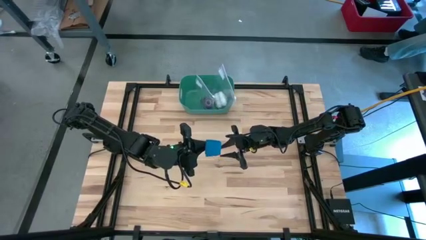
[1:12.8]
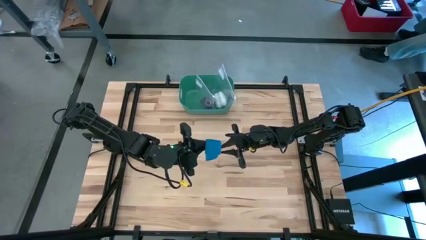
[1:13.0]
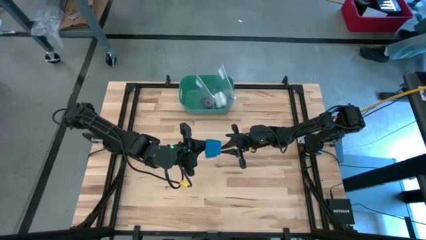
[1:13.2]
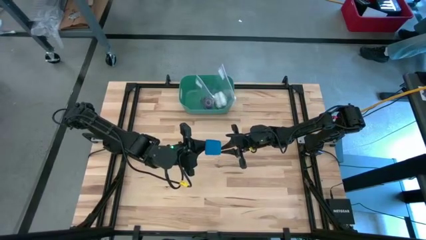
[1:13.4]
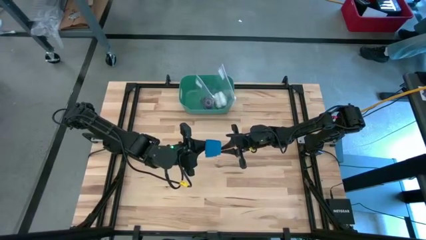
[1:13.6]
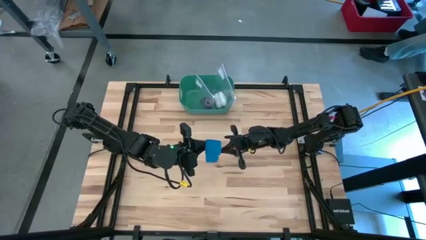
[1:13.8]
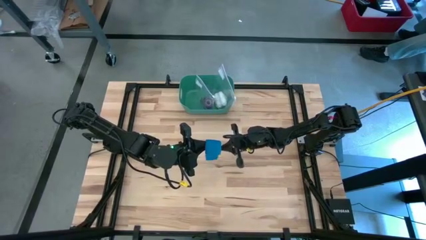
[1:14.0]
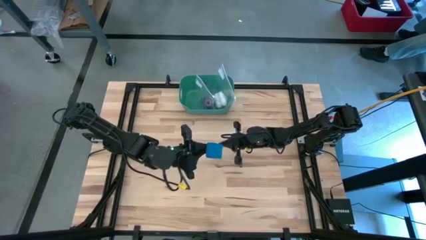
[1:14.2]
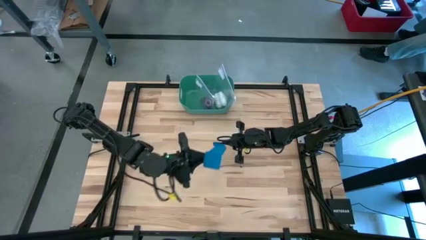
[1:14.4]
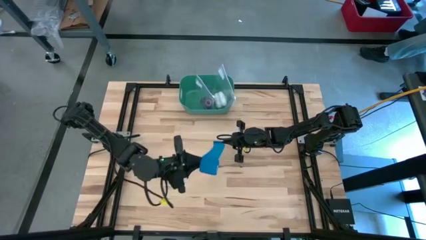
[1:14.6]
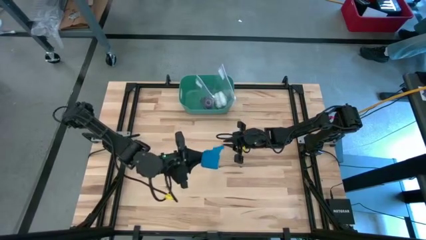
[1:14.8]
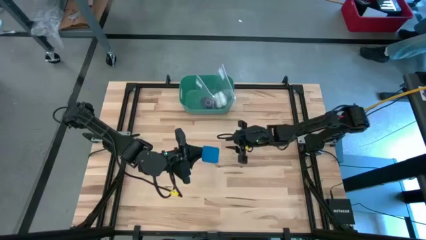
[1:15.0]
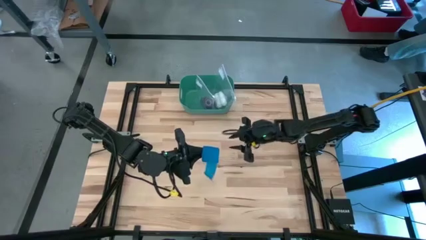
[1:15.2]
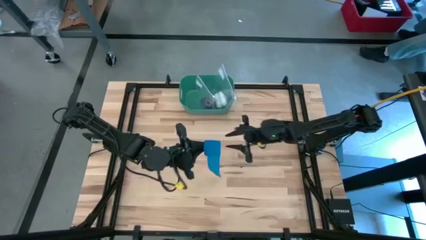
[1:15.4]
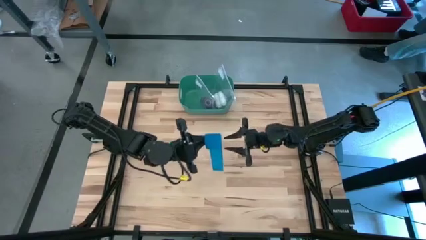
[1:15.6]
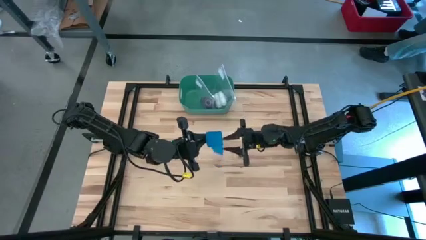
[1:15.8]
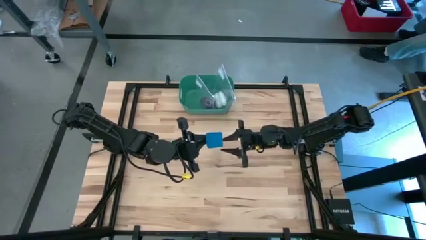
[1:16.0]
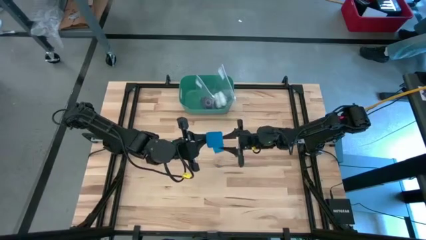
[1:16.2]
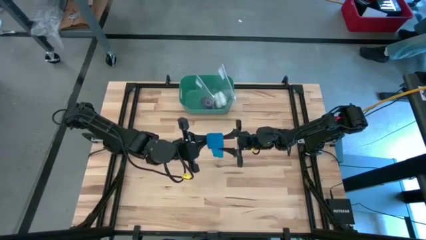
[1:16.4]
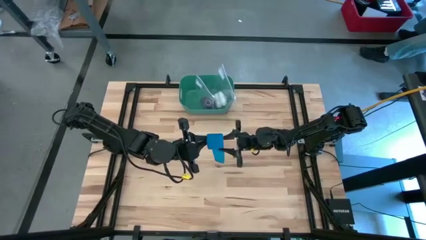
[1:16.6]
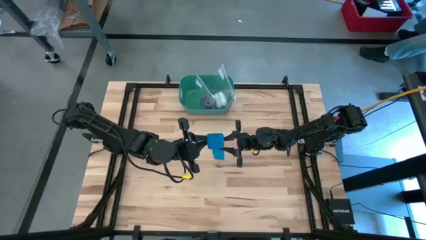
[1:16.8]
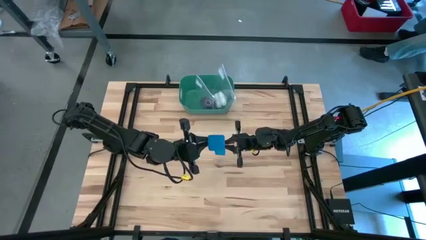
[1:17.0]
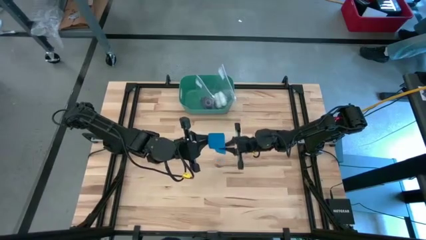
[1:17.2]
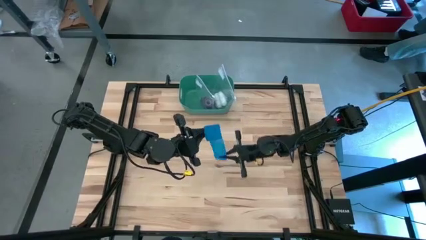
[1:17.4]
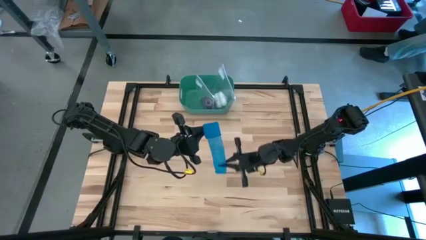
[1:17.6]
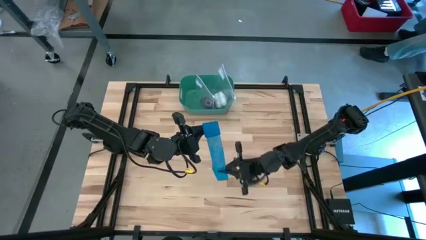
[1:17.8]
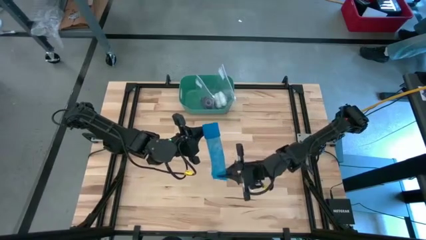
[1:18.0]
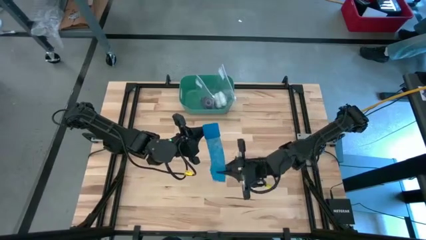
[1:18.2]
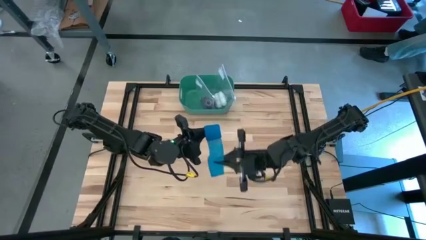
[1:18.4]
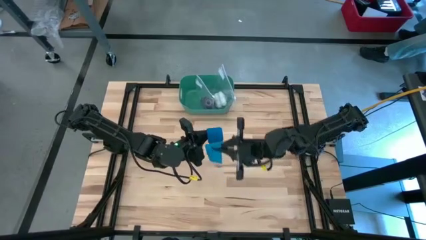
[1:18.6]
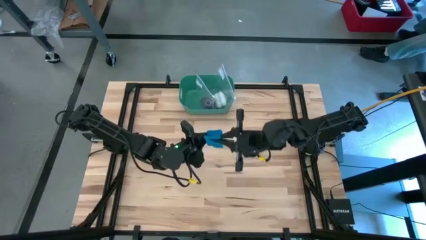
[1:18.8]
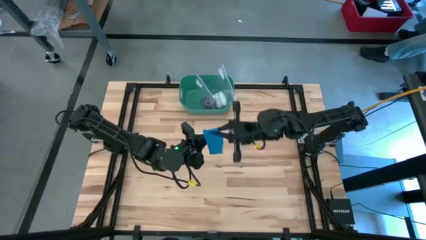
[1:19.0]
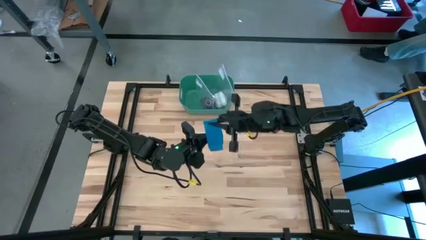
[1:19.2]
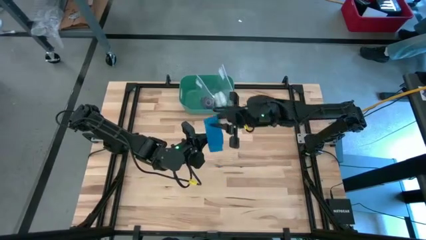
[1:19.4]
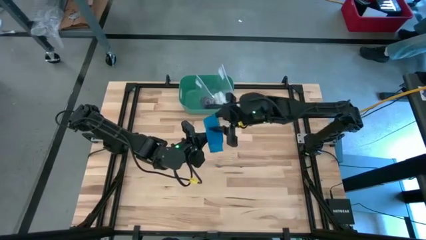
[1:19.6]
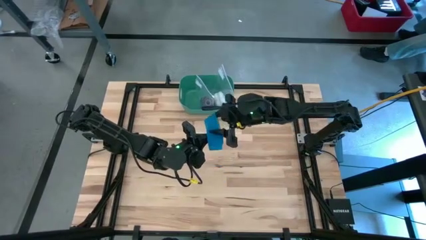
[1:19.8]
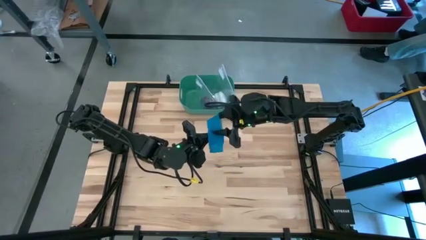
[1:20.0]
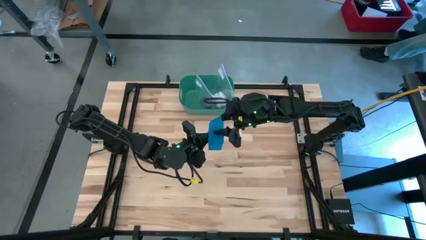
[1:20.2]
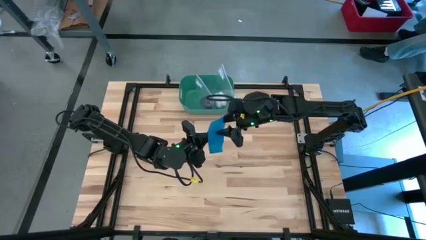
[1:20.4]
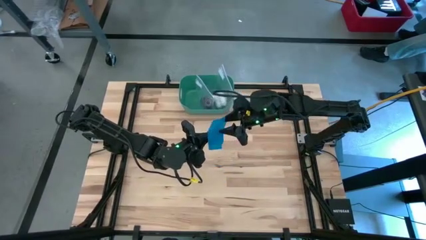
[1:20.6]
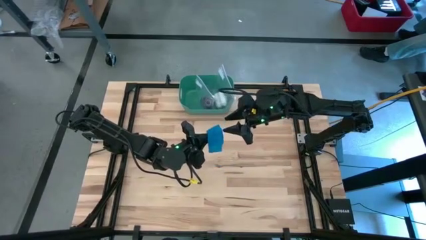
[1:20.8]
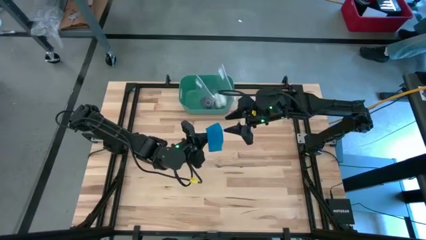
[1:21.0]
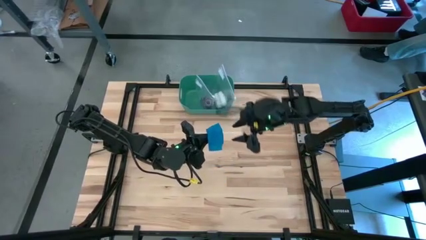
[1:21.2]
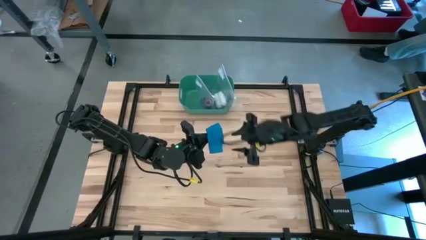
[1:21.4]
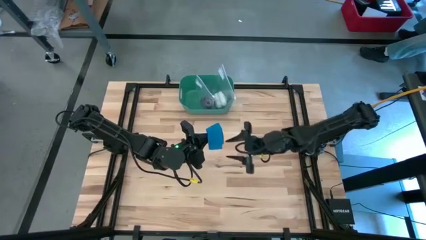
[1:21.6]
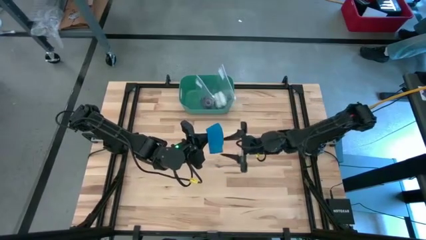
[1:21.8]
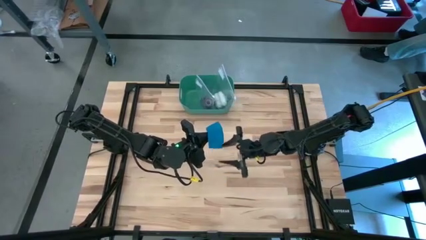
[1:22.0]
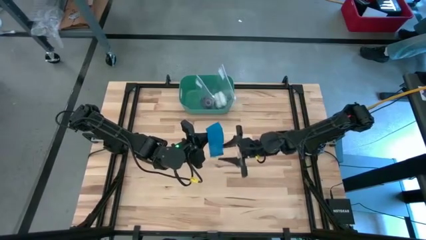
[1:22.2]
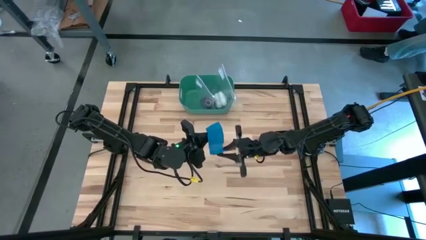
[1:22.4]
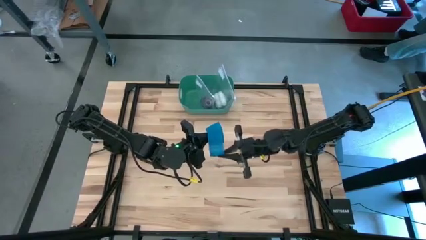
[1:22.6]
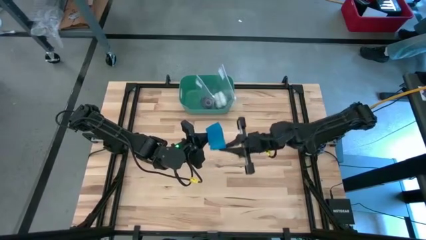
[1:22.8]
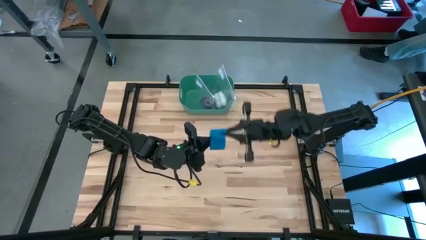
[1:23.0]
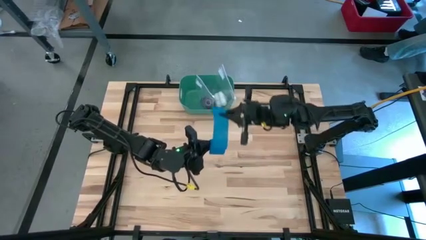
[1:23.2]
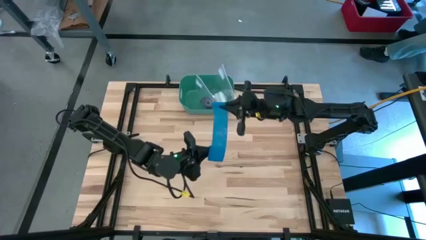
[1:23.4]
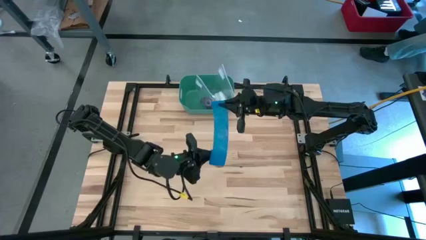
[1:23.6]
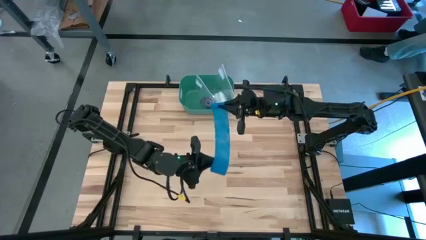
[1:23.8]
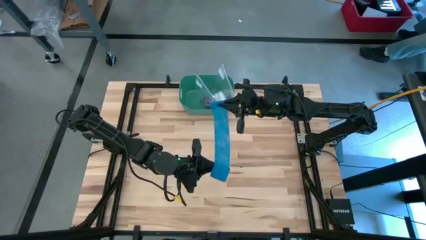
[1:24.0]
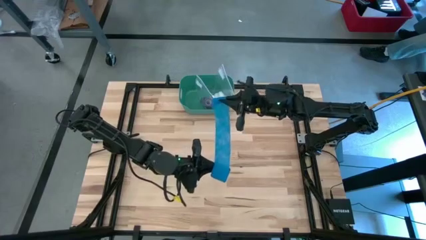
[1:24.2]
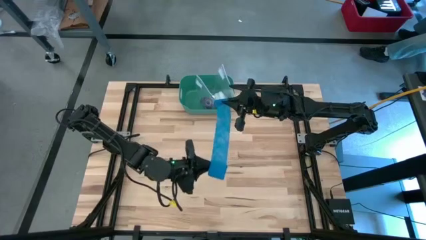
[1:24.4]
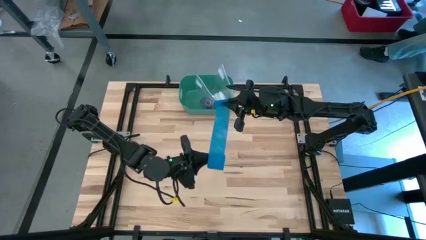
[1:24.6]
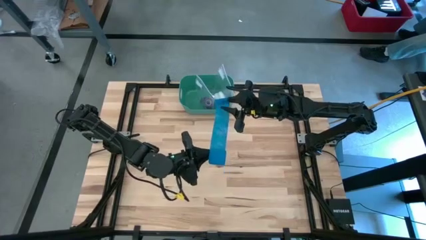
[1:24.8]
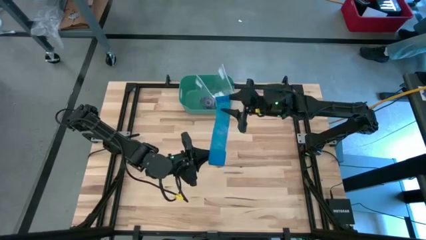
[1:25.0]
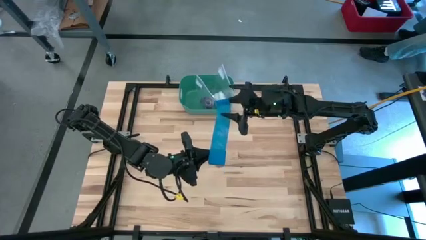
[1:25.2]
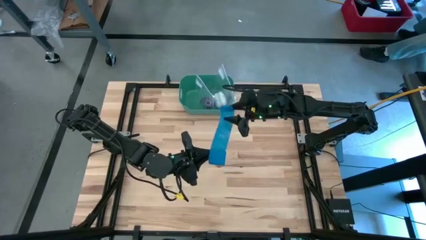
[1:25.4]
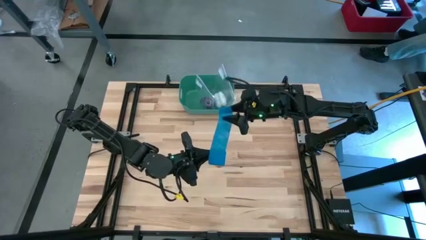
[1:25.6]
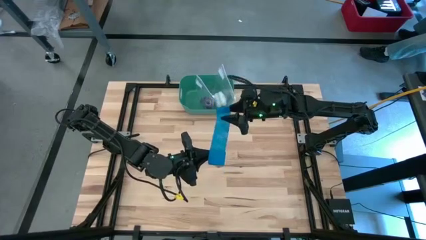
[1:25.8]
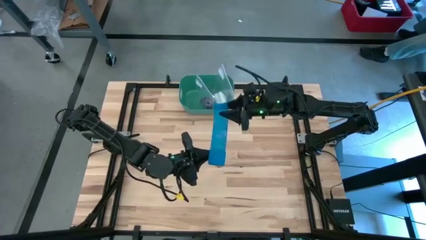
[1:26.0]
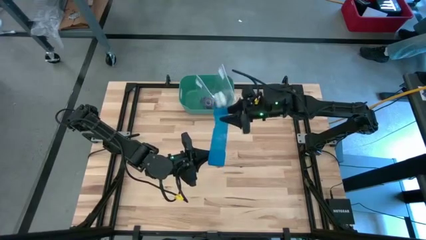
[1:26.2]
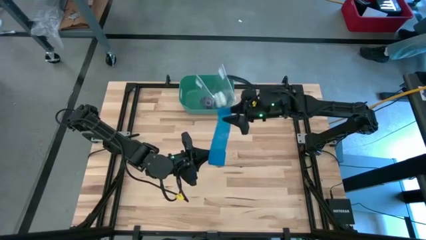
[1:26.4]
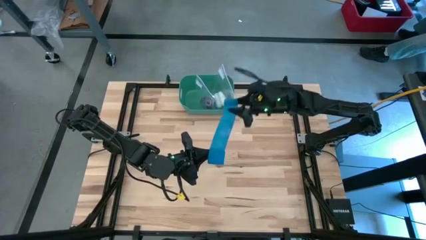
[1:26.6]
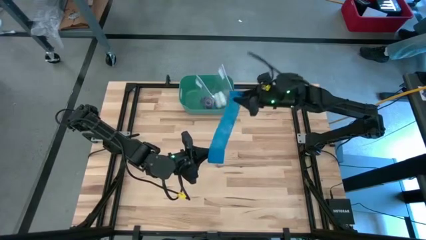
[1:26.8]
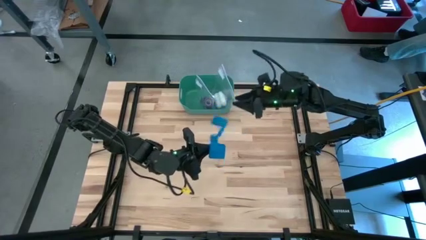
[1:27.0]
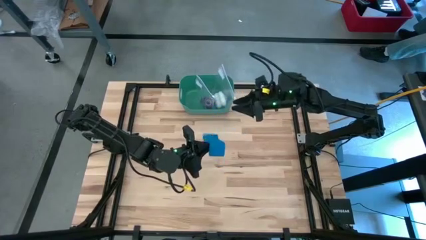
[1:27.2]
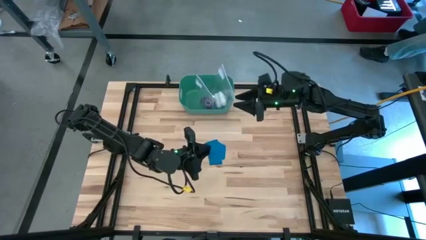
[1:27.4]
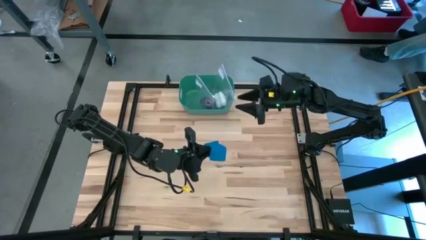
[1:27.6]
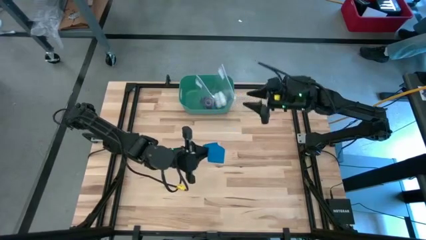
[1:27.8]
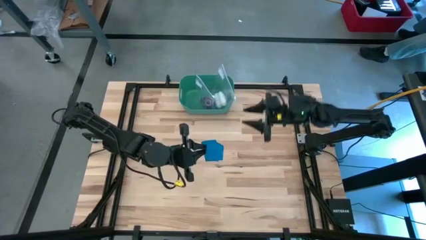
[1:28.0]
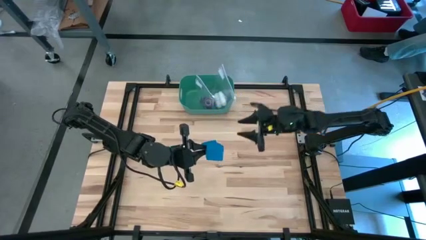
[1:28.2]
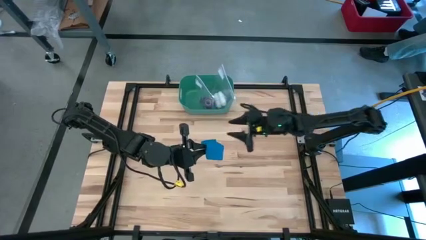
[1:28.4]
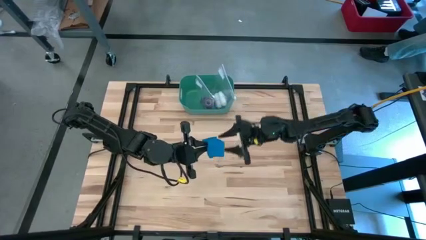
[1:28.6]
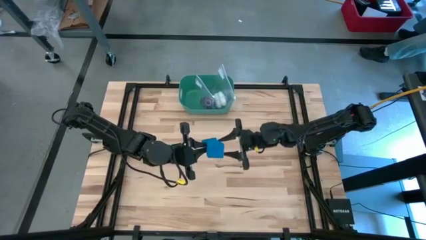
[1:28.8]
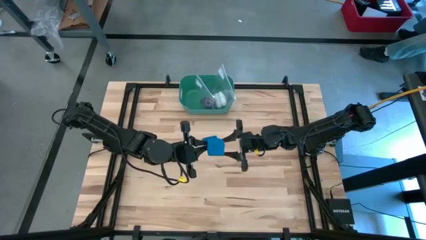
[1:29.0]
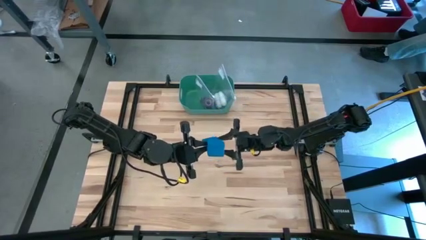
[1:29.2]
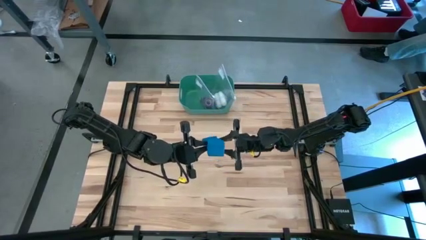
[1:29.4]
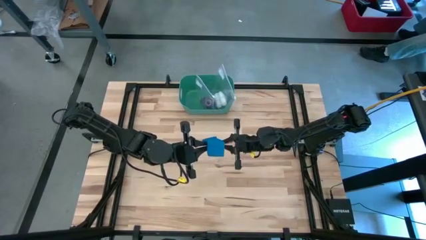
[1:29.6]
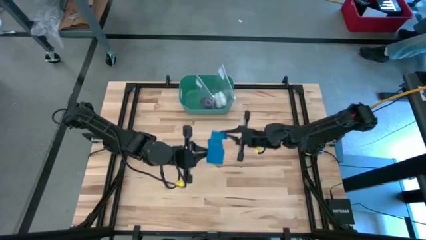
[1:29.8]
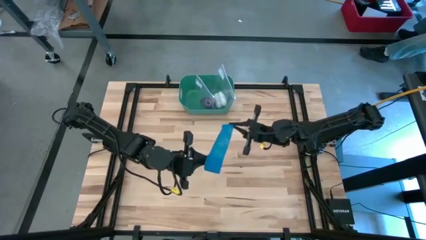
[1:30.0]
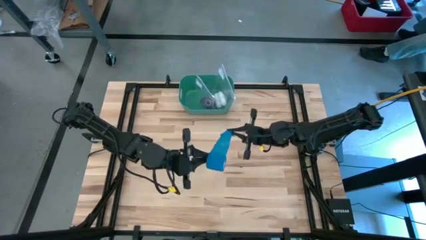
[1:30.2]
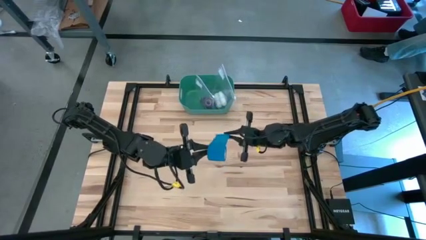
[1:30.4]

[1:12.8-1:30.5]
Task: Roll bandage
Roll the blue bandage
